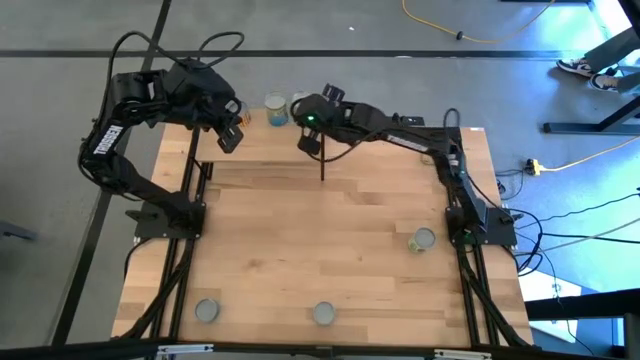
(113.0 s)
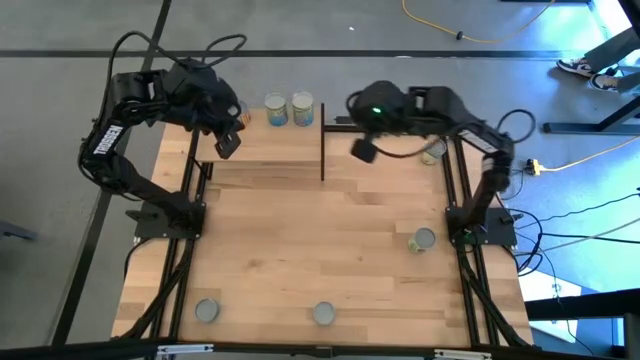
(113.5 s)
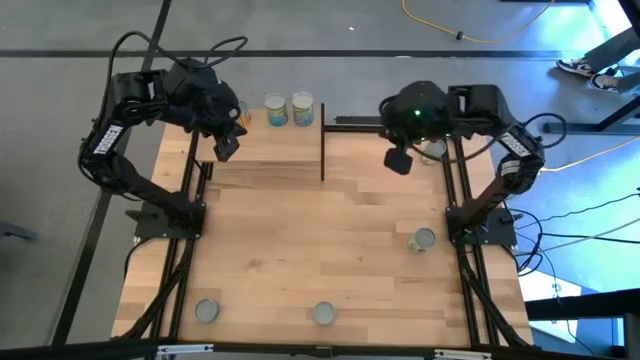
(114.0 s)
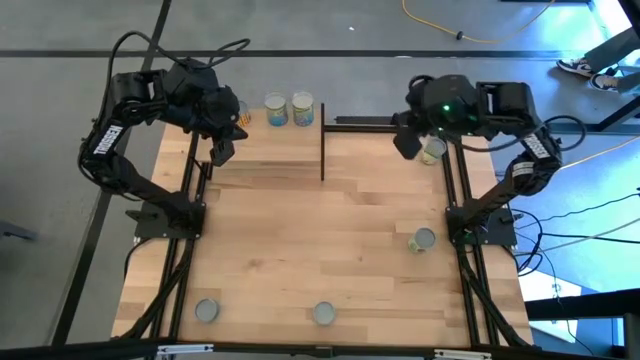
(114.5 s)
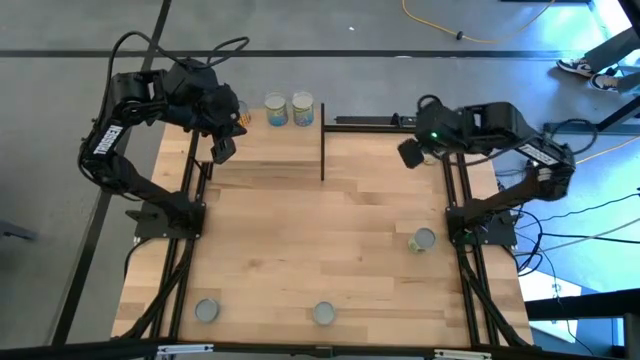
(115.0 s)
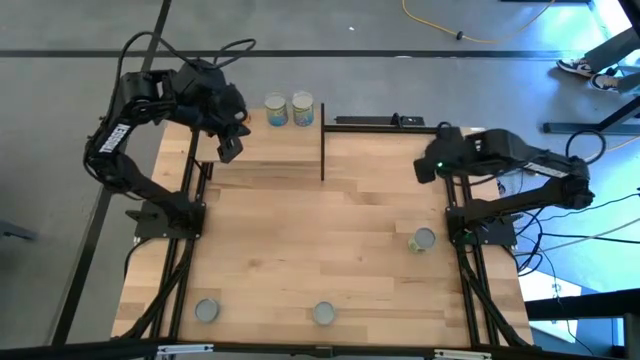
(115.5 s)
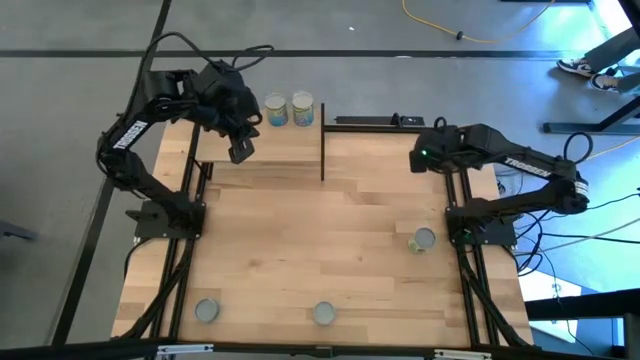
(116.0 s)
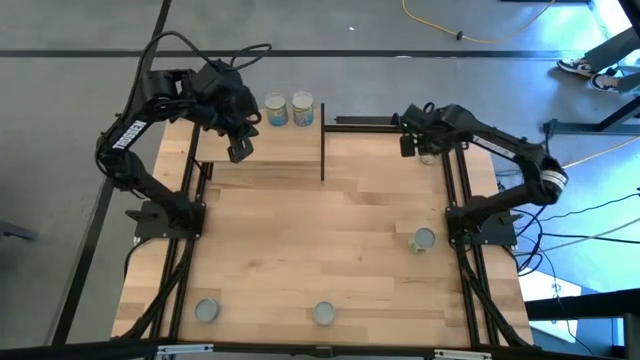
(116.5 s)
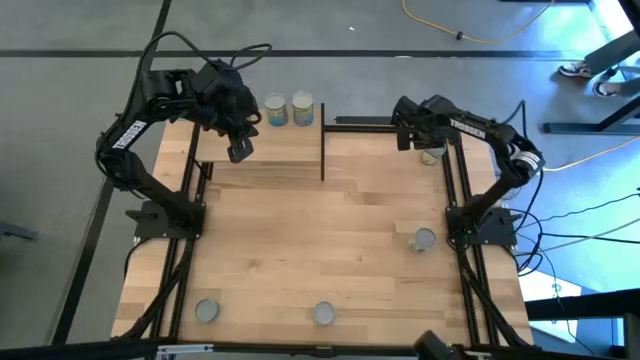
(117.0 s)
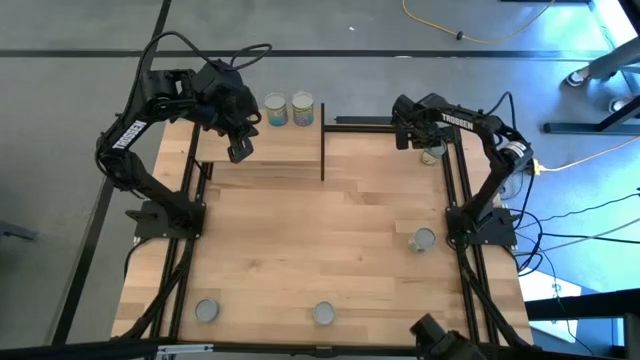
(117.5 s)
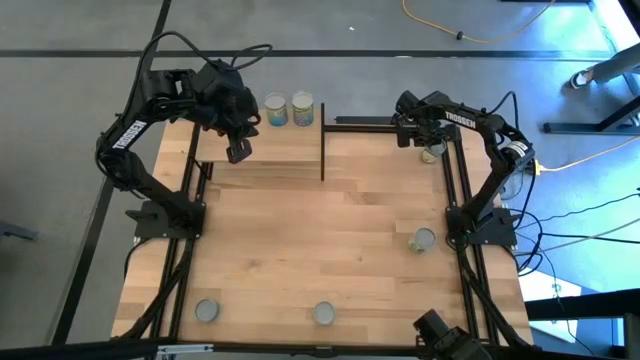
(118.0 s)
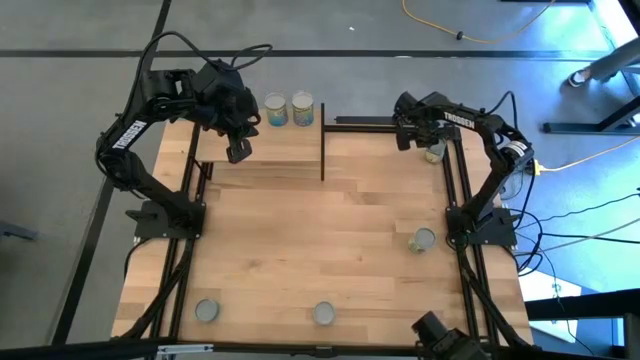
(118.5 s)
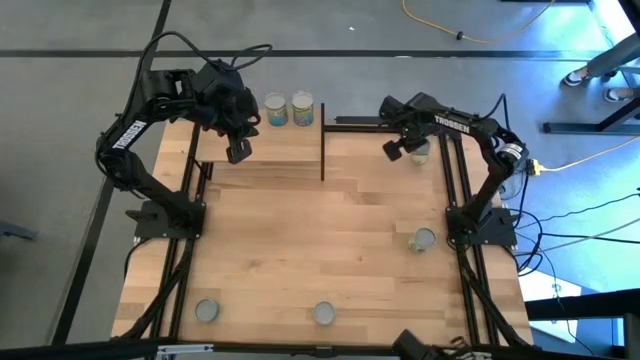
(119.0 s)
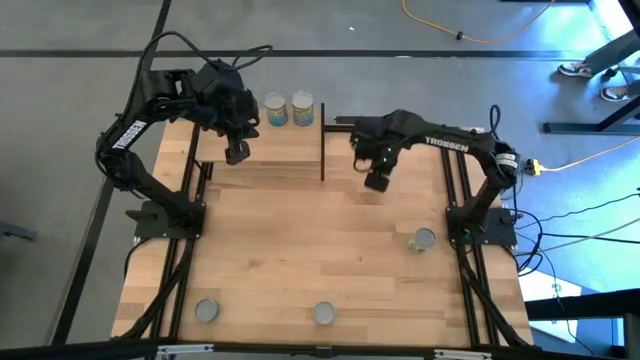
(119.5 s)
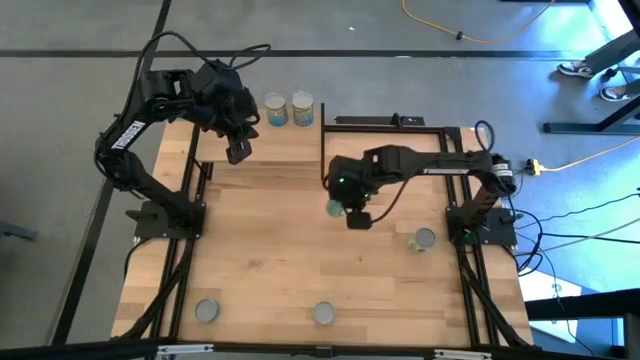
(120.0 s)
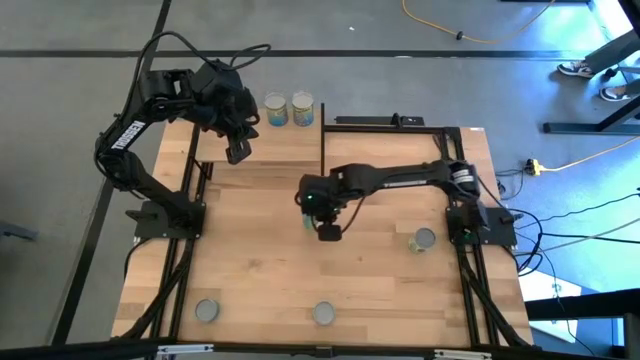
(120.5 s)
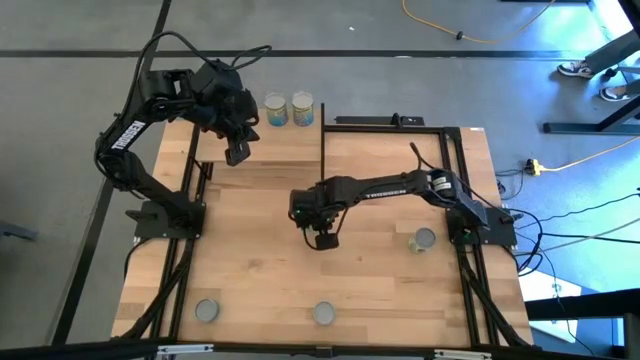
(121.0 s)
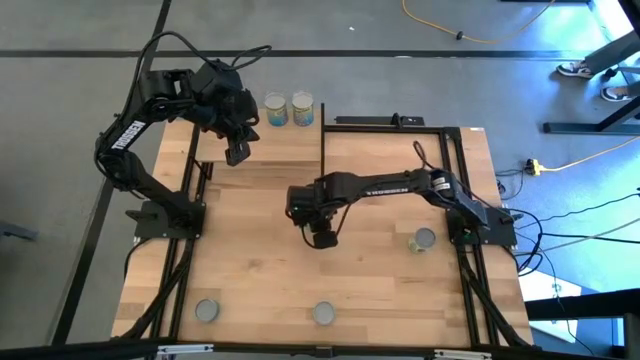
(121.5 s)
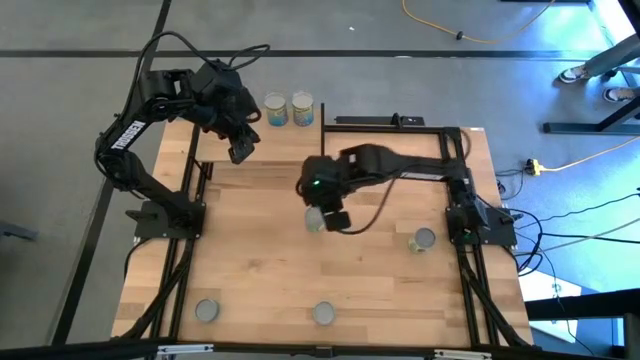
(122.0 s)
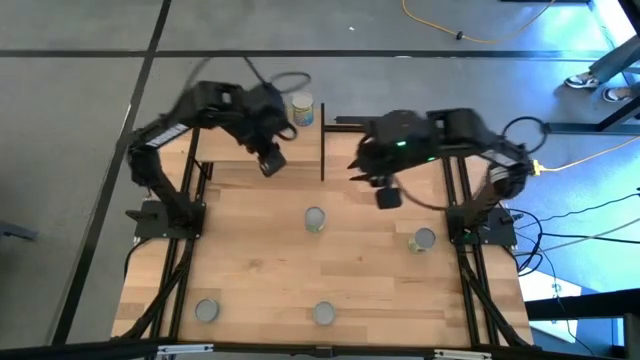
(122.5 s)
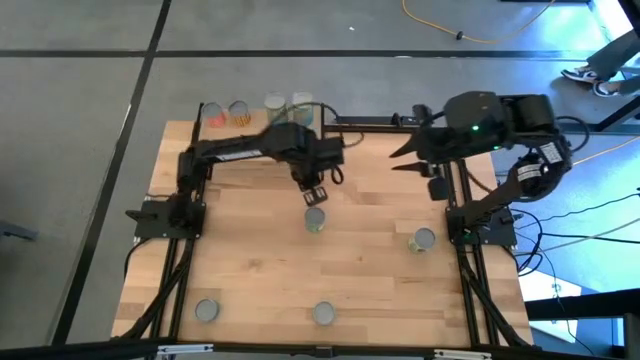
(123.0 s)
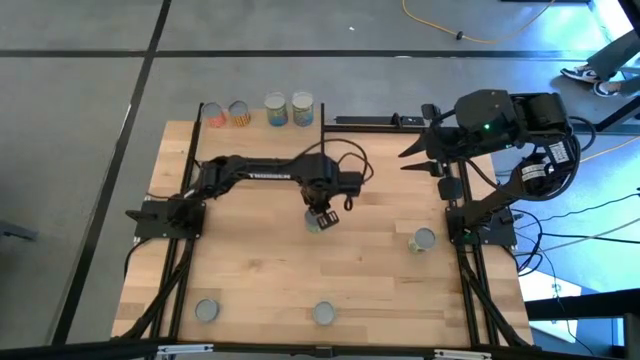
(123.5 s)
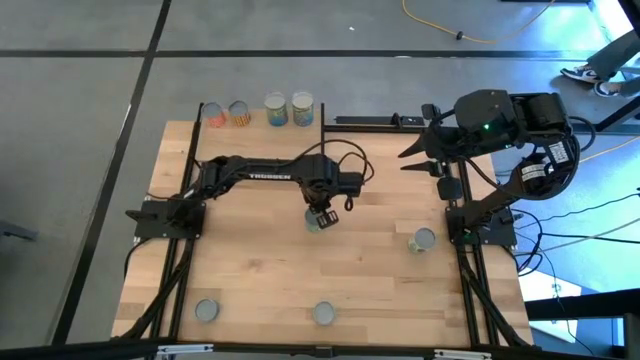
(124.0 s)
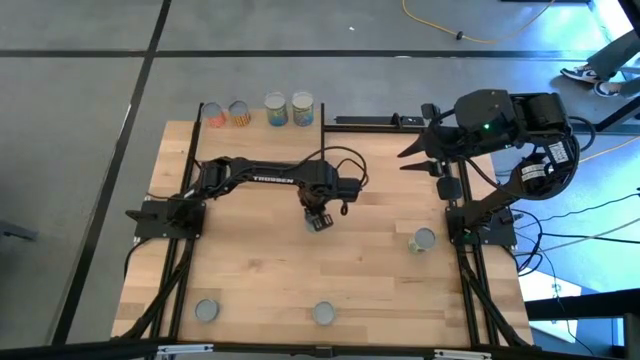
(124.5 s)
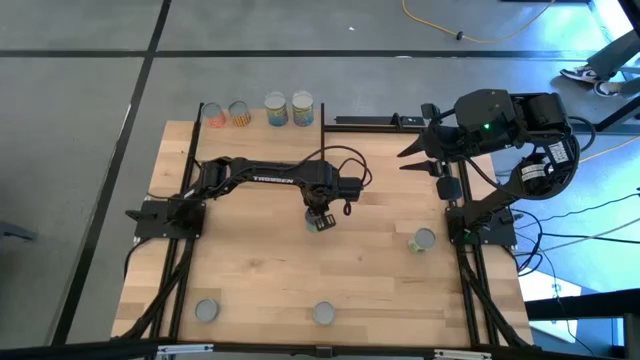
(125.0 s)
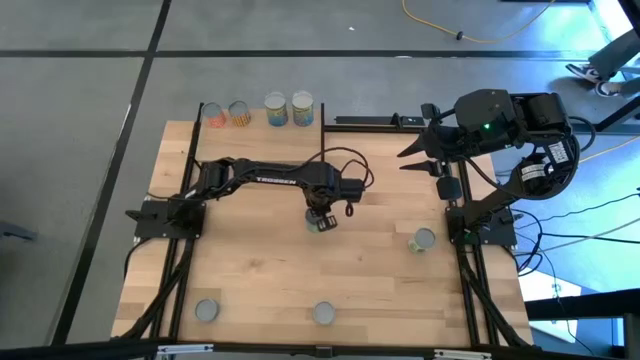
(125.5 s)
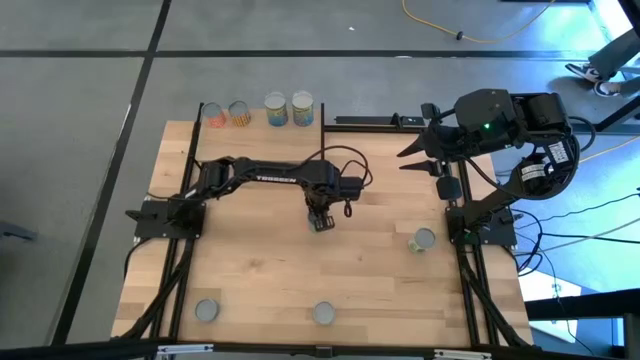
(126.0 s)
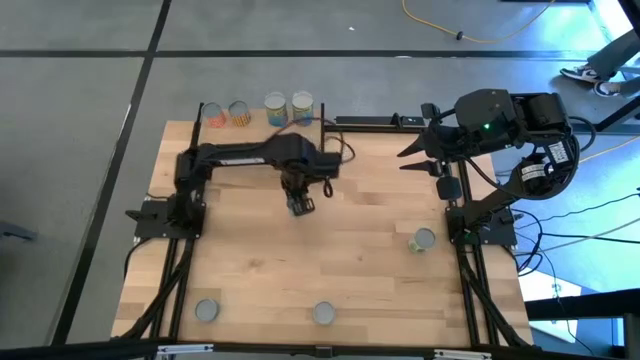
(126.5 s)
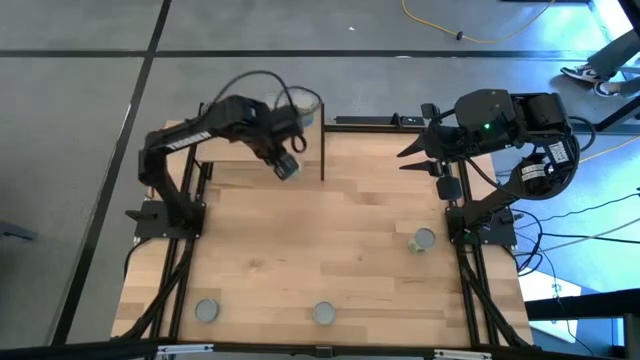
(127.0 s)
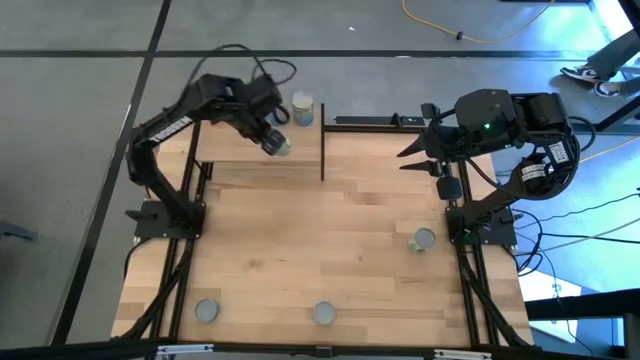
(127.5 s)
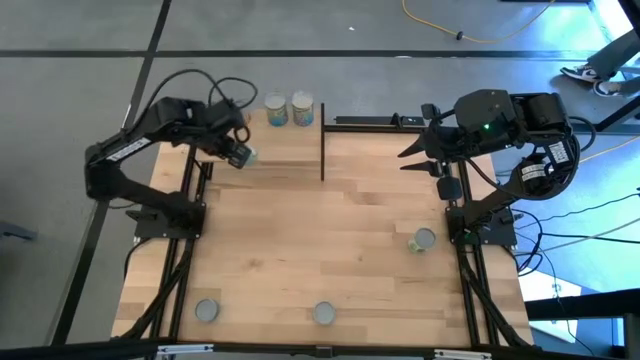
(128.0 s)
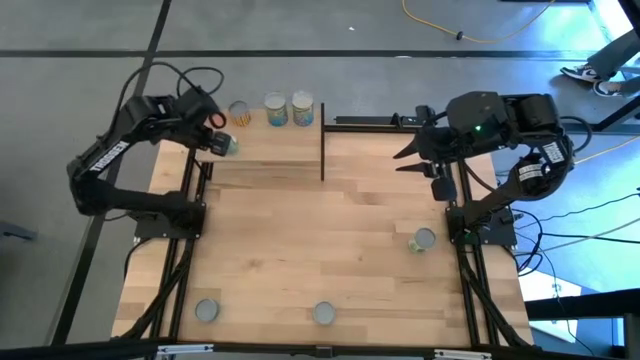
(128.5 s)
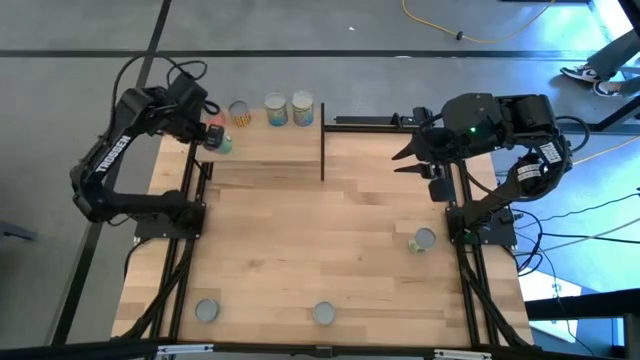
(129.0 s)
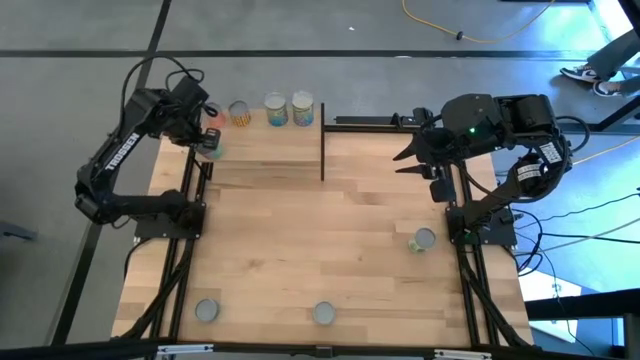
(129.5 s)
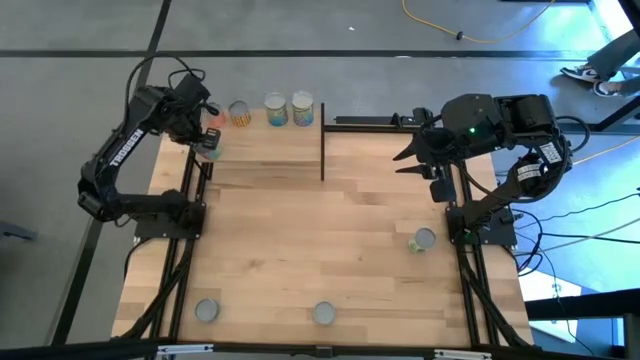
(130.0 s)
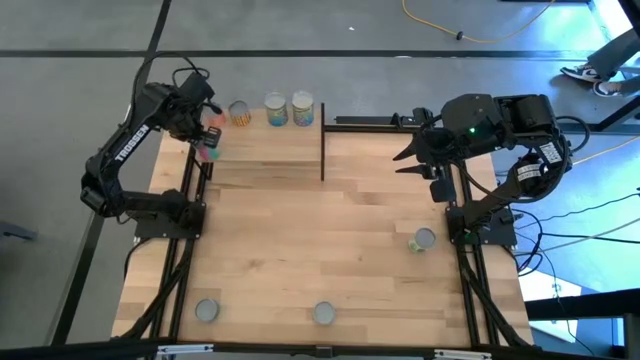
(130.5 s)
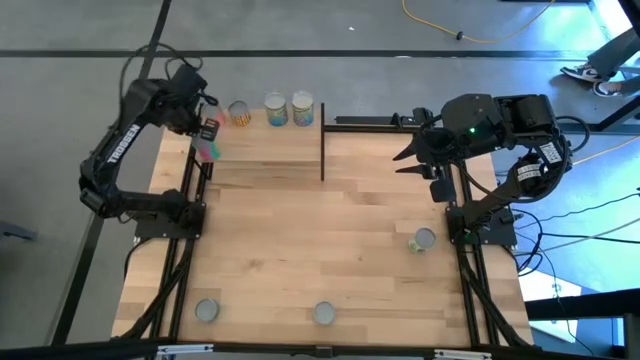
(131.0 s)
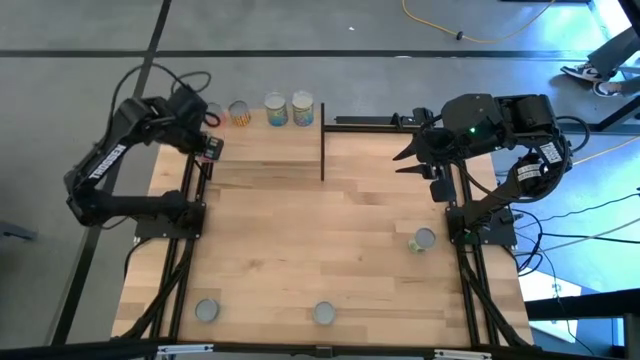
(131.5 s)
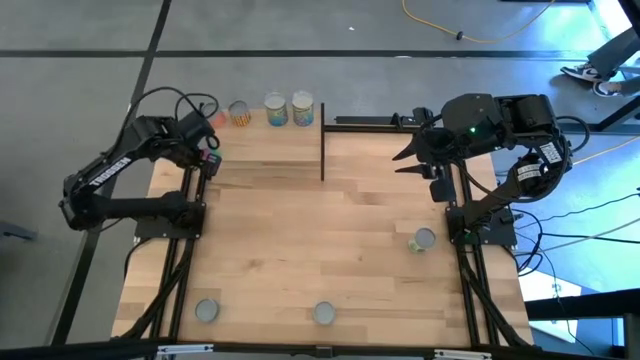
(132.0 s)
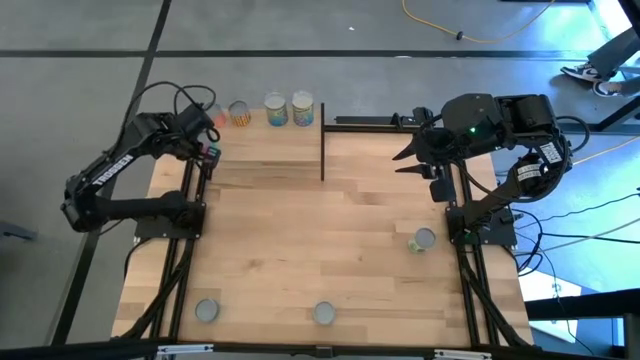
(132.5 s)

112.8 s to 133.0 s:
Task: Pick and place cans onto a shelf
Put the canned chicken soup on the shelf

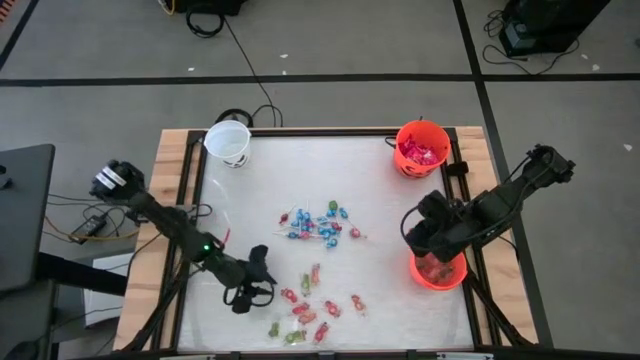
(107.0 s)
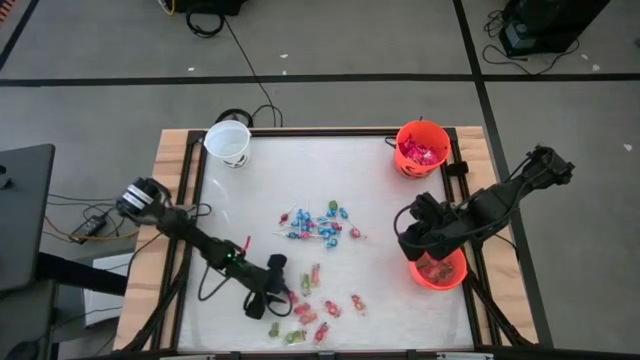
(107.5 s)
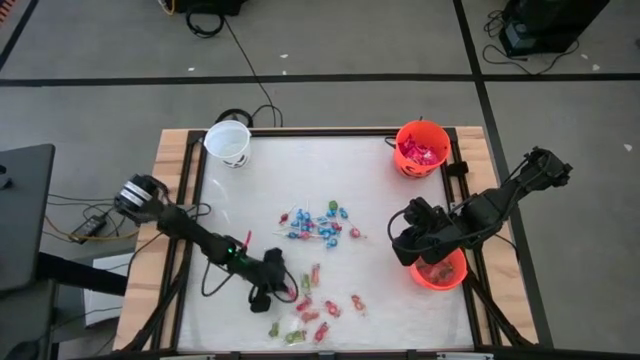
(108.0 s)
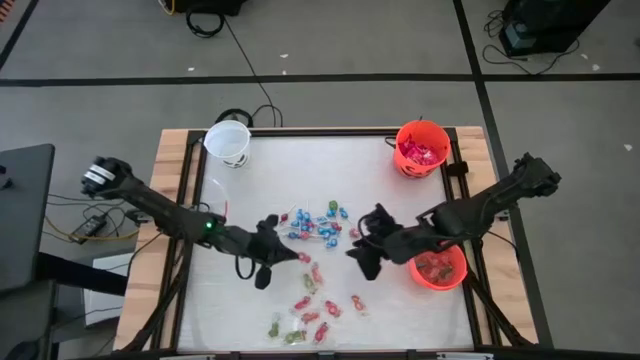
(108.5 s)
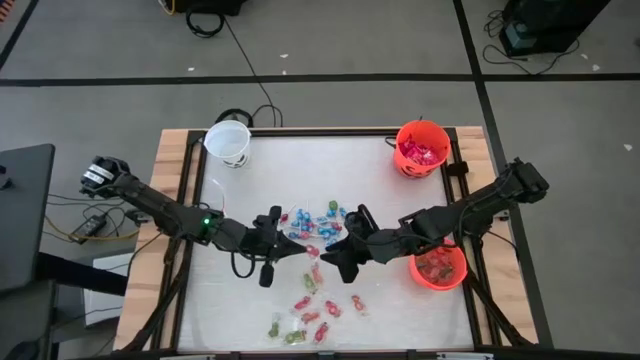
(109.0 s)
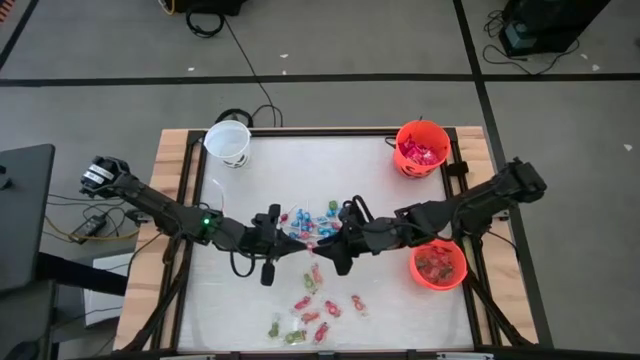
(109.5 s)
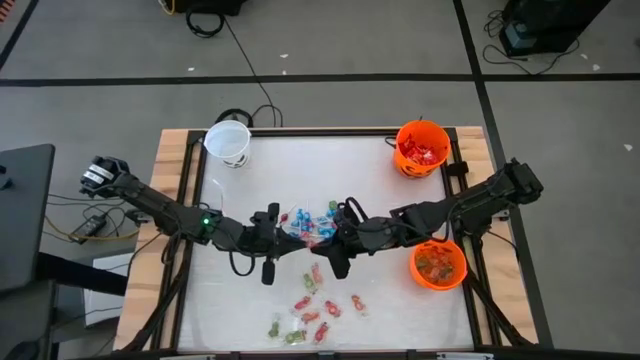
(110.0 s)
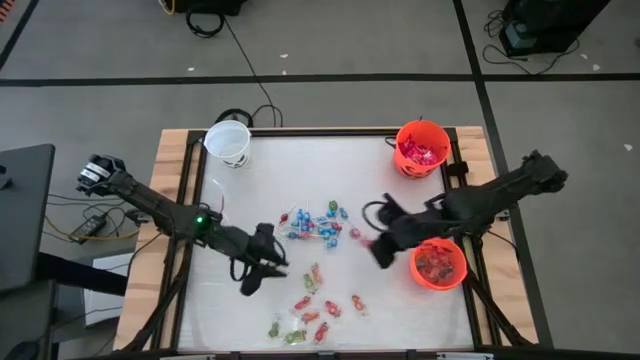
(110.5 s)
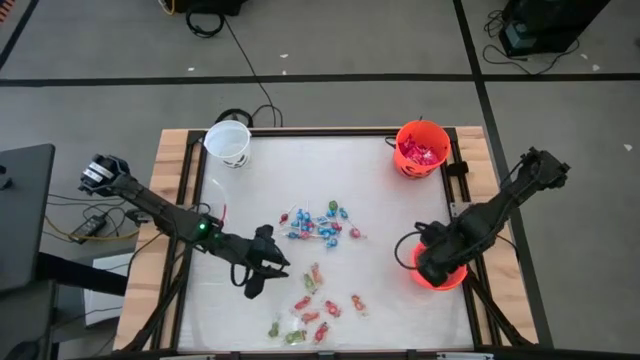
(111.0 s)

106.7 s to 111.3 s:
Task: Sort candy by brand, put in halloween buckets
Put the red gummy into the bottom orange bucket
